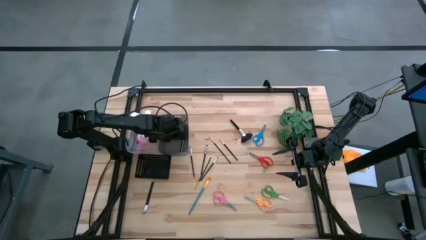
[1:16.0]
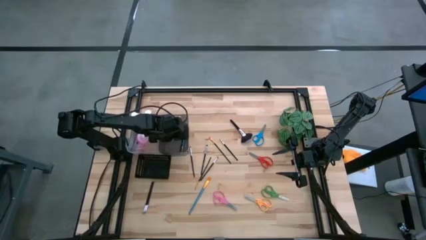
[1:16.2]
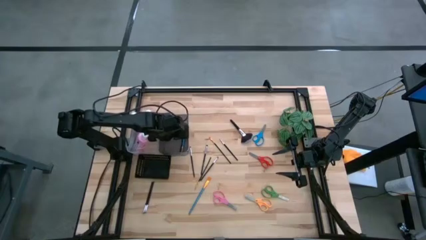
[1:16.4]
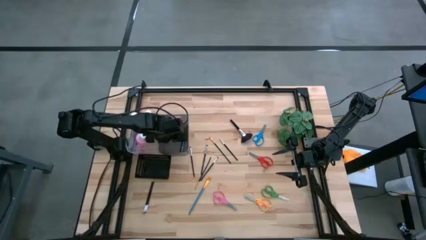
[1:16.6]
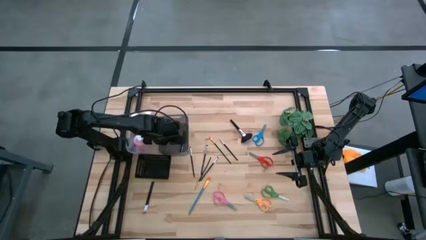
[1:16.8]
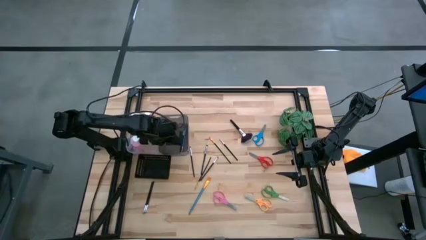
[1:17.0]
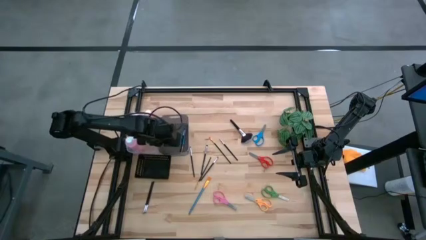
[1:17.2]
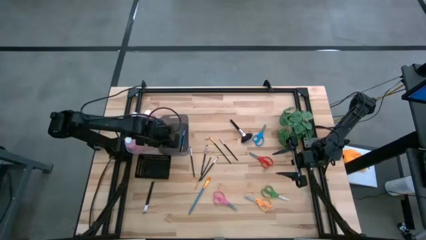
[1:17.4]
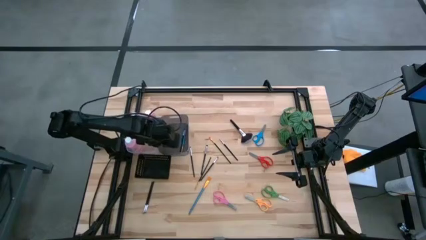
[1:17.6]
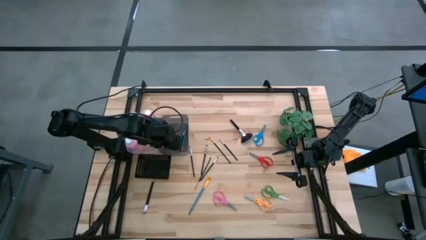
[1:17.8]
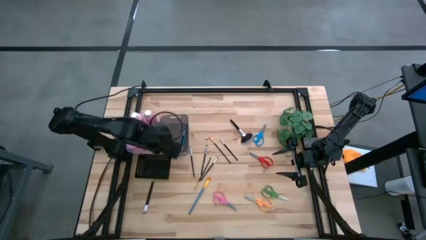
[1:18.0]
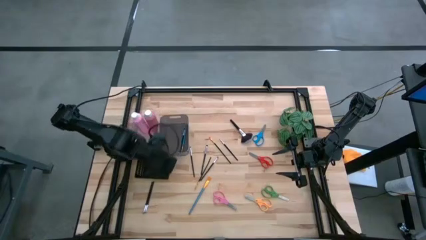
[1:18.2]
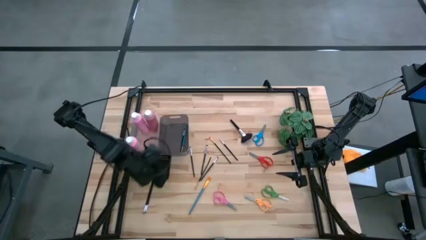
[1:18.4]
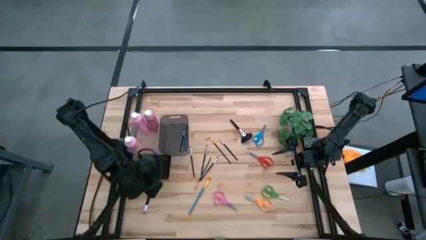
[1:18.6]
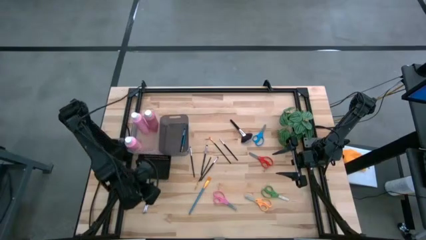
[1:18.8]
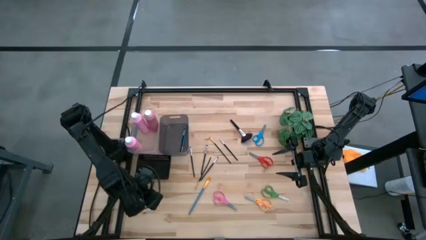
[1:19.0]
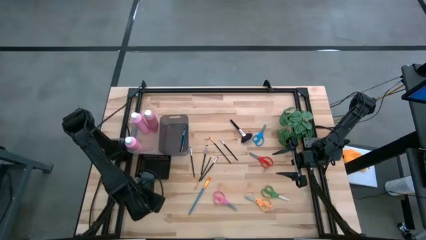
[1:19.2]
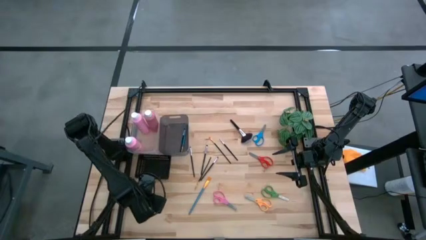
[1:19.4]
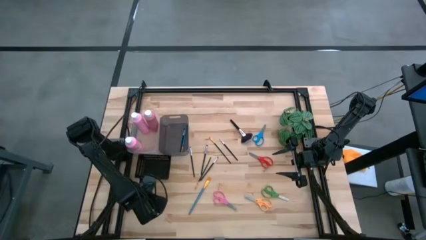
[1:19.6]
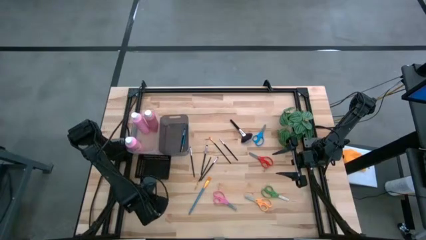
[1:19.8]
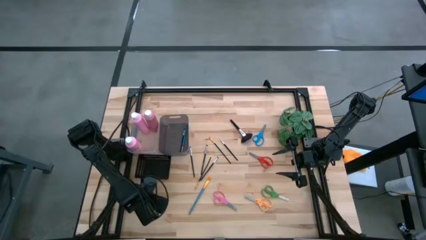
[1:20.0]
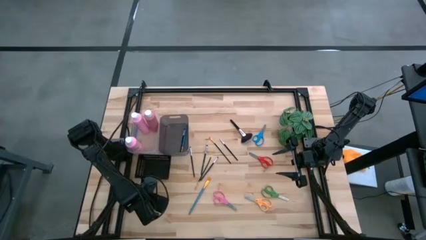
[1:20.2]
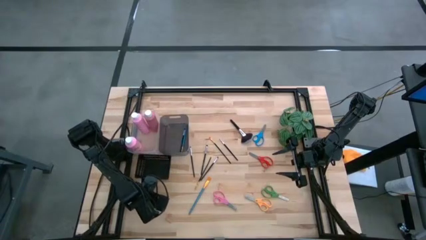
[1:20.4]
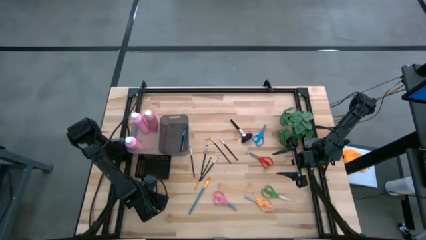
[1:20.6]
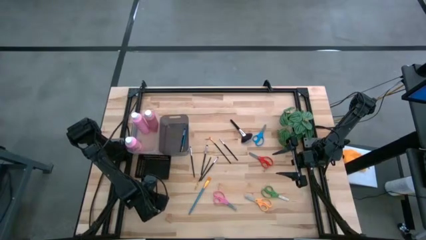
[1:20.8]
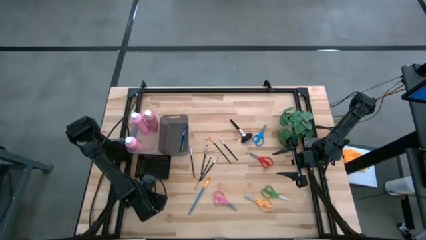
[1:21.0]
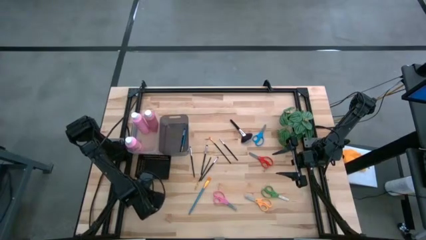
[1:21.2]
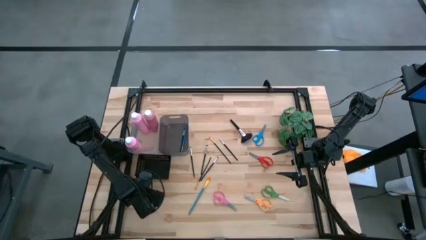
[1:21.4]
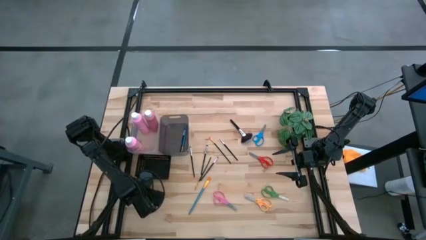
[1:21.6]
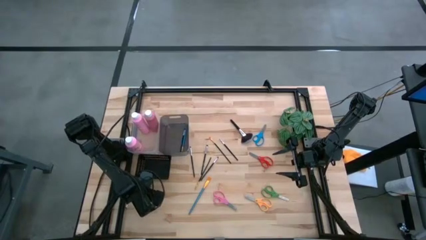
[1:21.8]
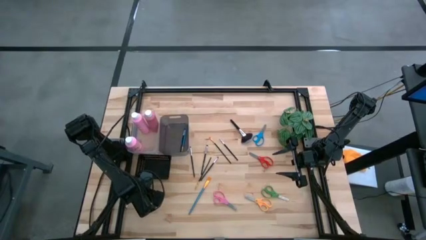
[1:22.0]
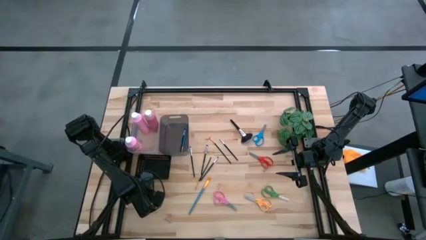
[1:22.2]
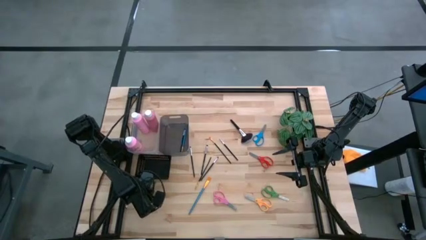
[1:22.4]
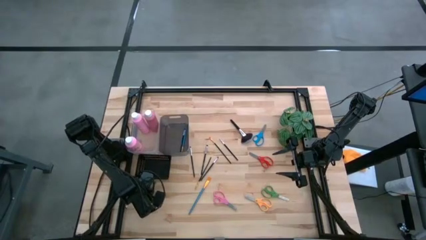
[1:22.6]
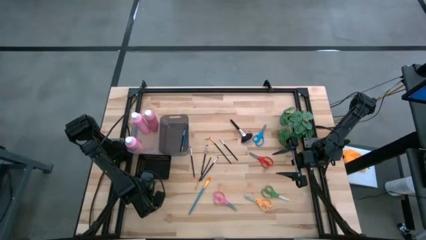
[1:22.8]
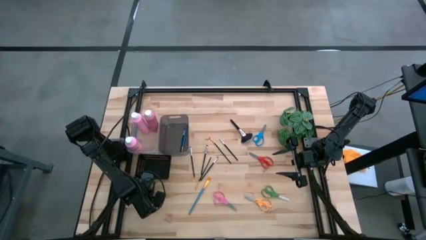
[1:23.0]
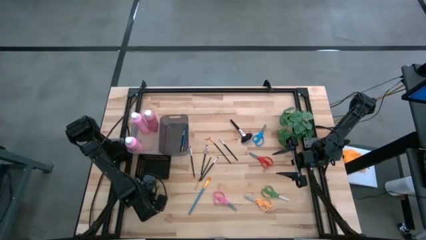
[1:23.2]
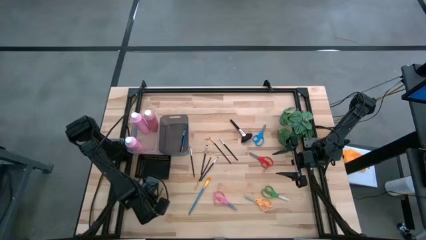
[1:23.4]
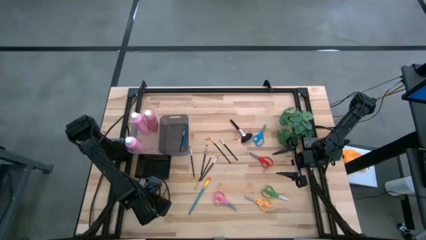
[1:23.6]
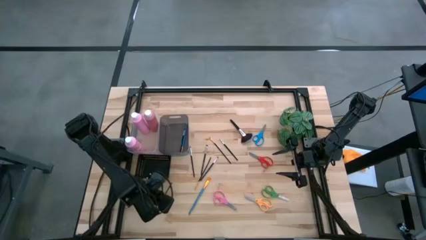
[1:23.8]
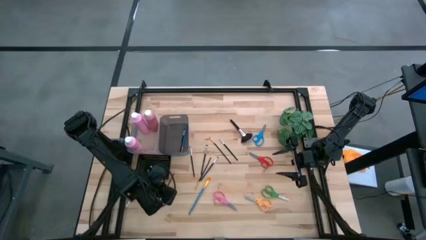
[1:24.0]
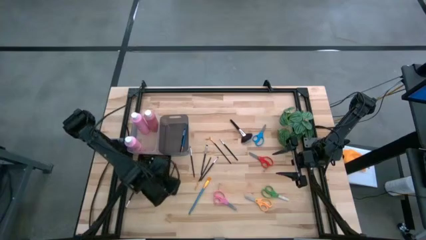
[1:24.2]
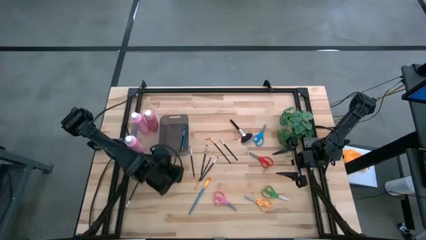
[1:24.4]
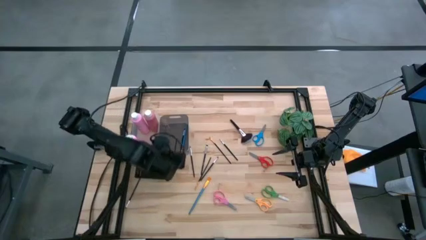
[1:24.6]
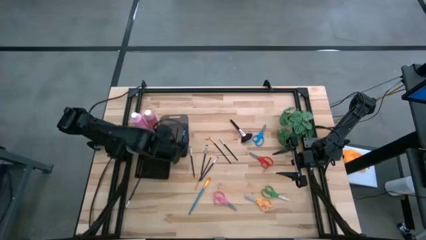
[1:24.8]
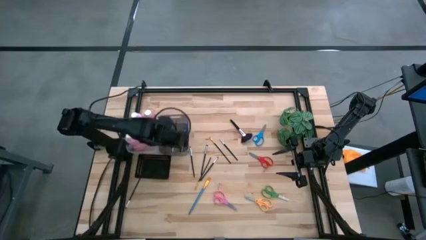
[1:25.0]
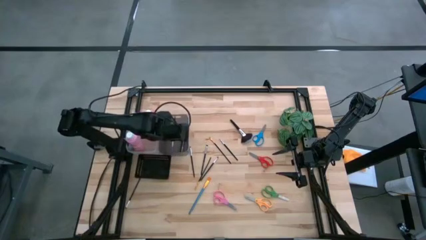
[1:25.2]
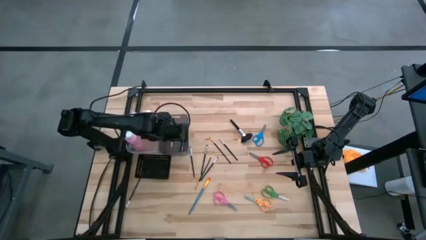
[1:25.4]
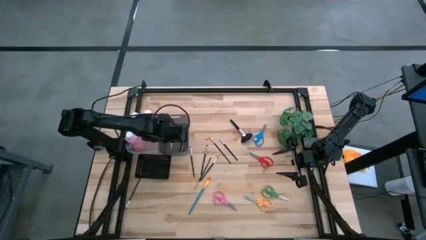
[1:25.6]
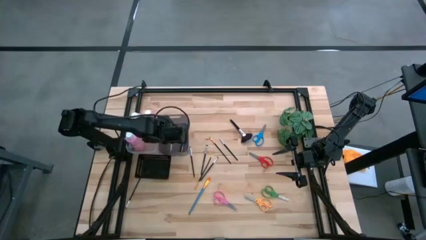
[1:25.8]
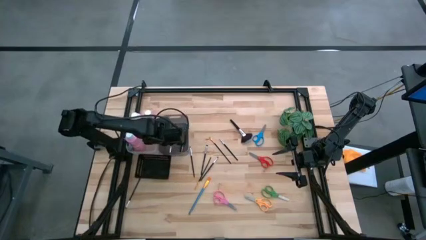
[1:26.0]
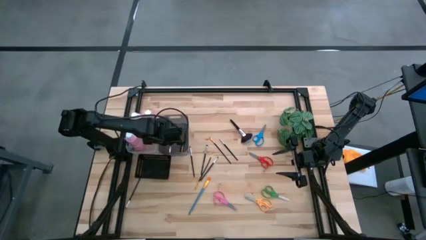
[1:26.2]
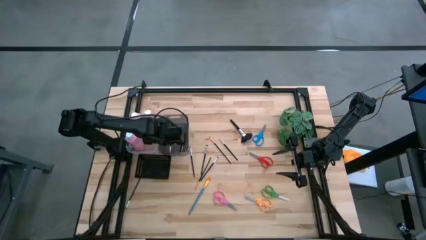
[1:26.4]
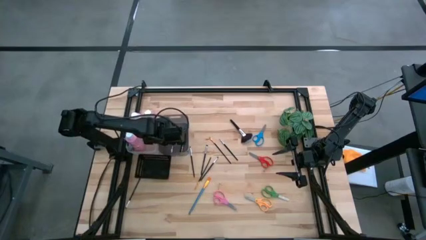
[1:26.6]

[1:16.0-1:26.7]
Task: Pick & Place Paint Supplies
Put the black brush into the black bin
